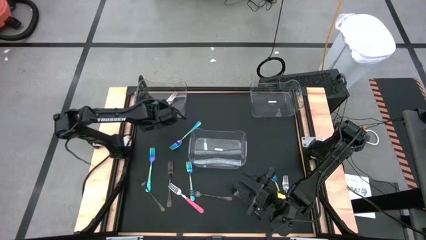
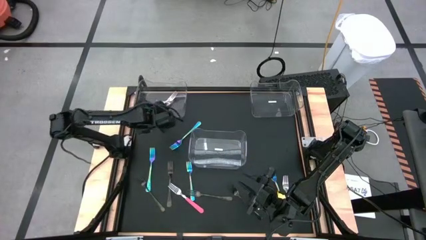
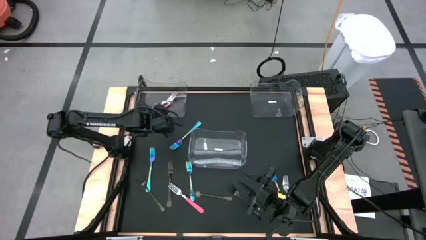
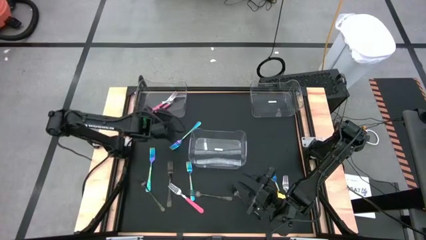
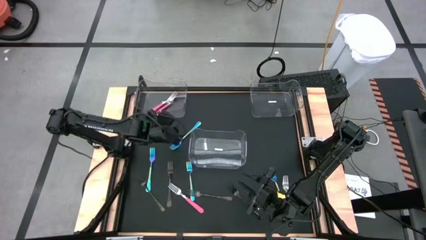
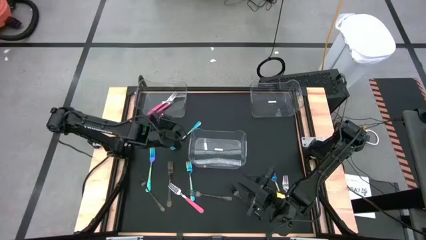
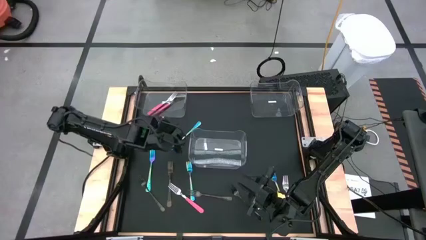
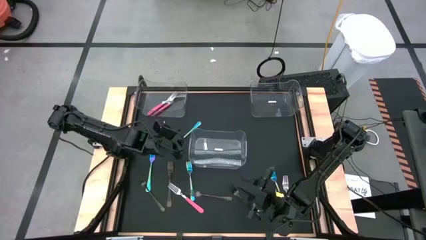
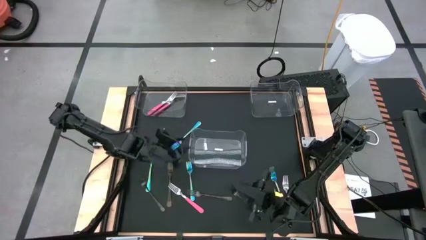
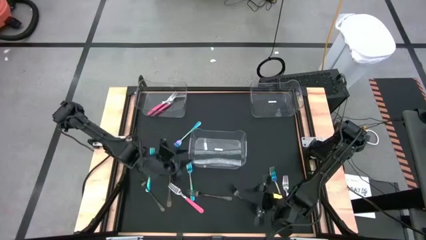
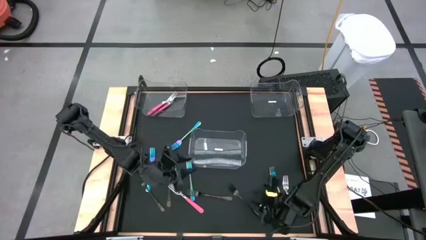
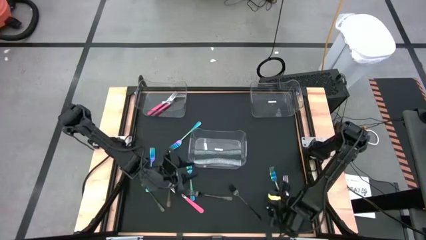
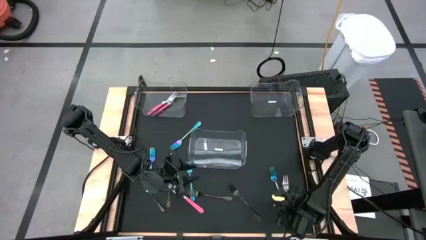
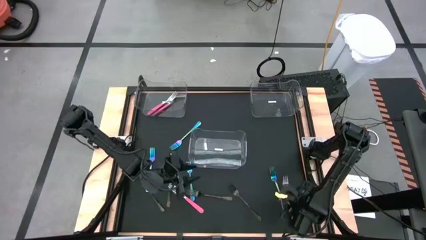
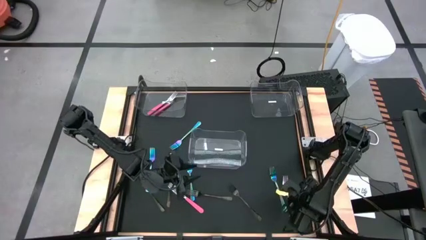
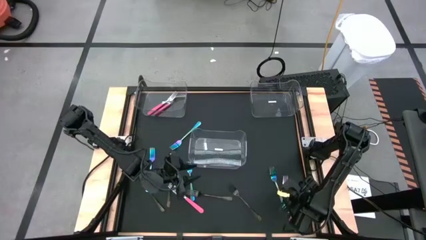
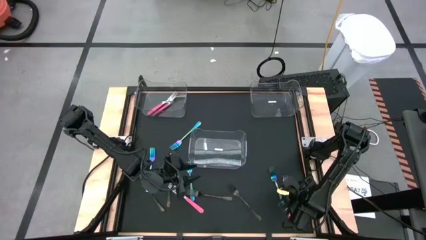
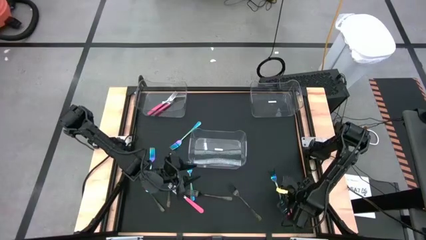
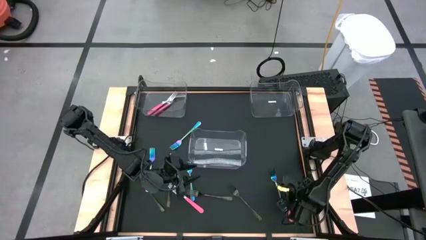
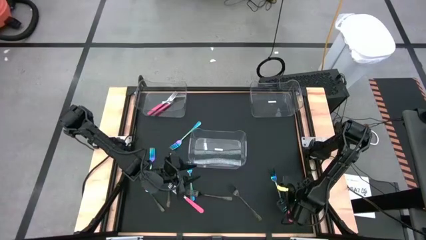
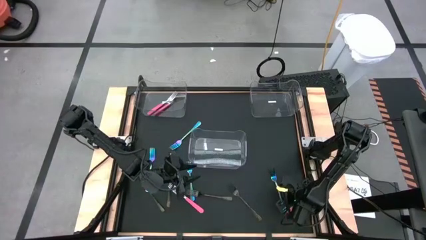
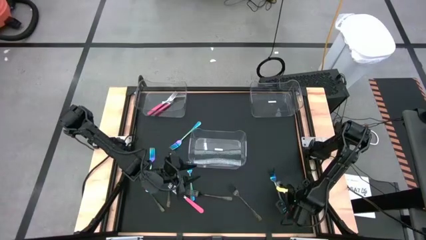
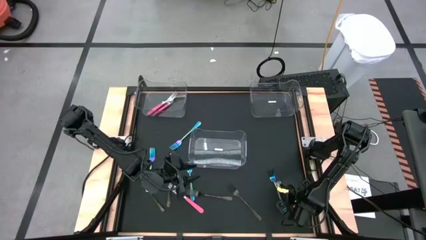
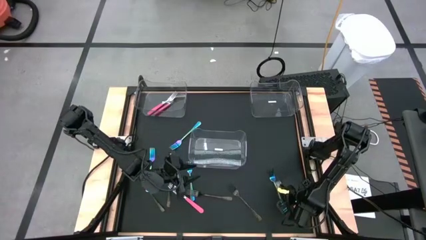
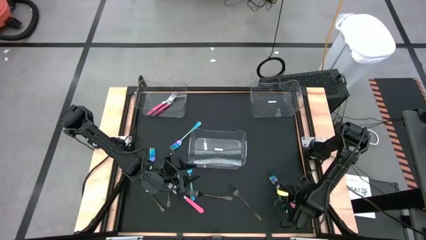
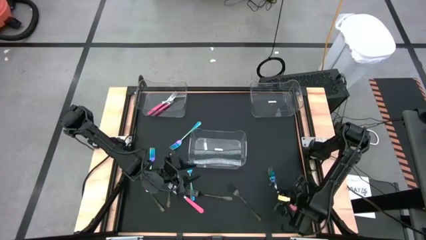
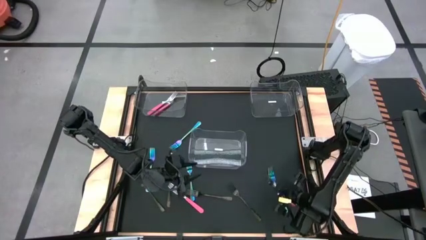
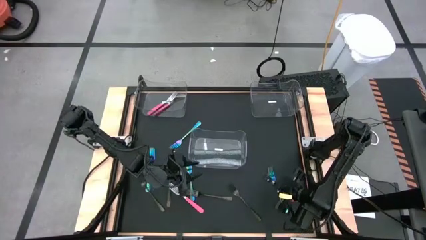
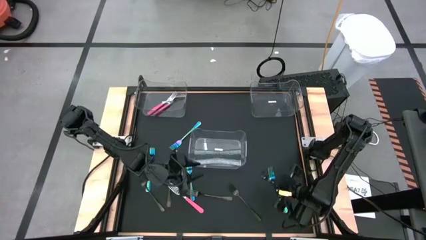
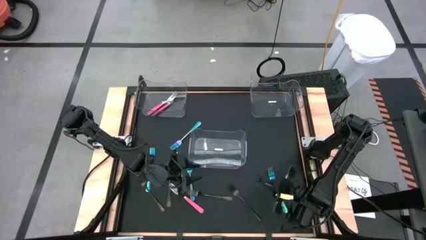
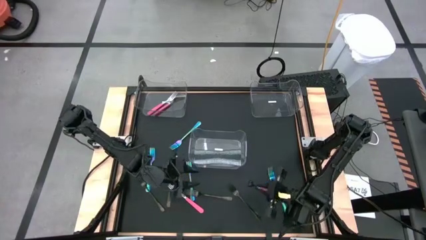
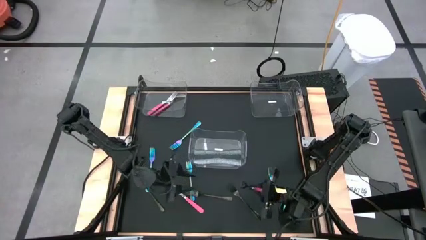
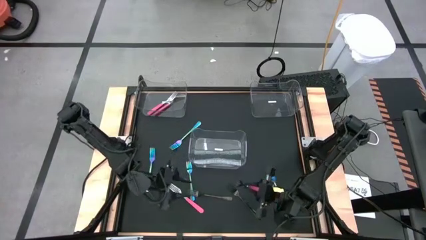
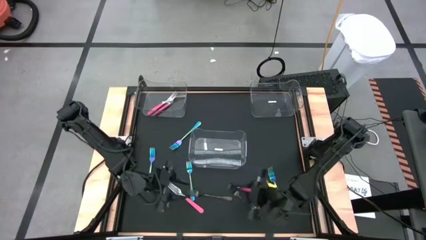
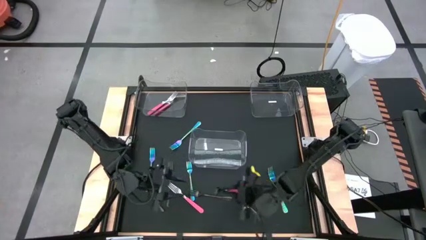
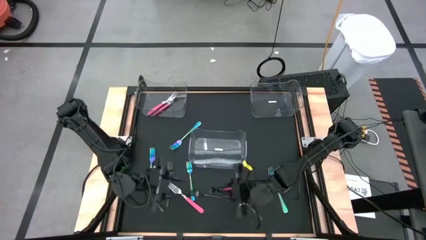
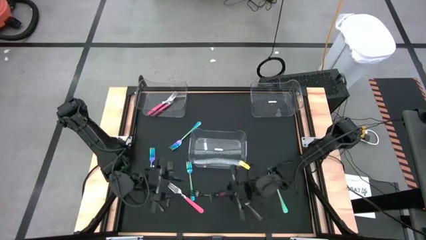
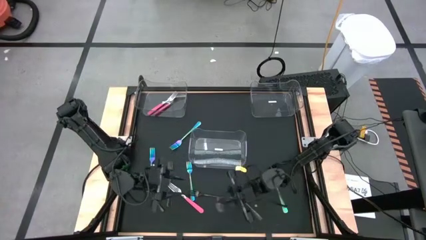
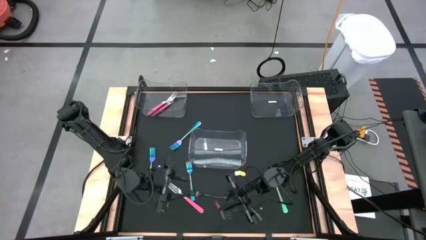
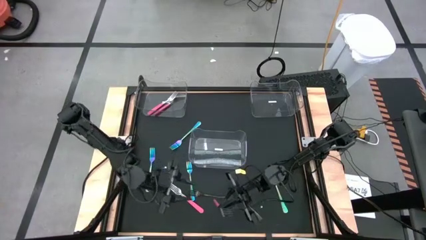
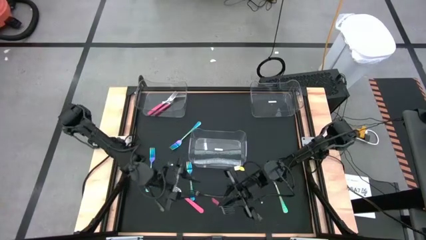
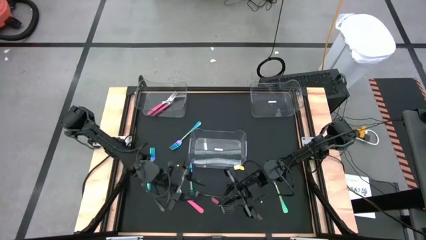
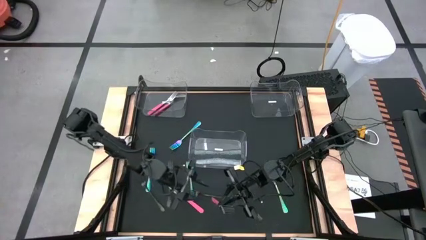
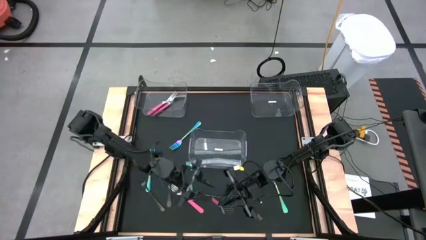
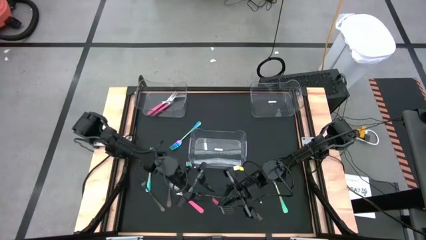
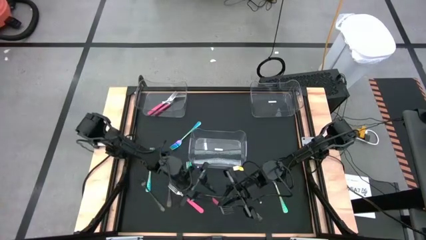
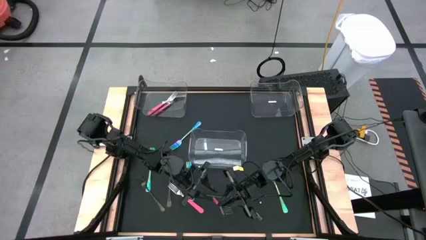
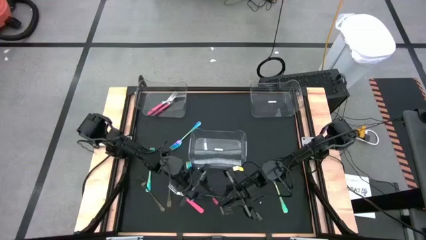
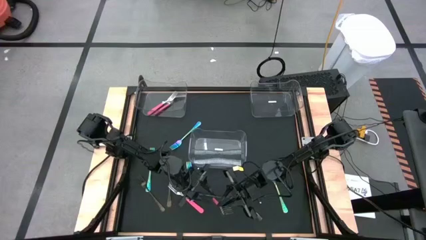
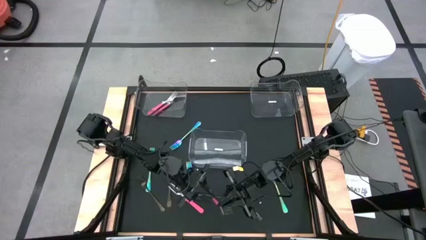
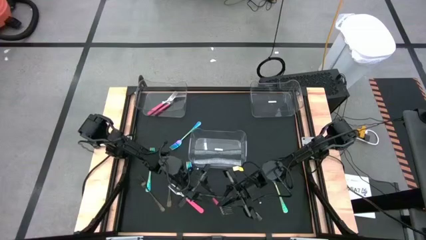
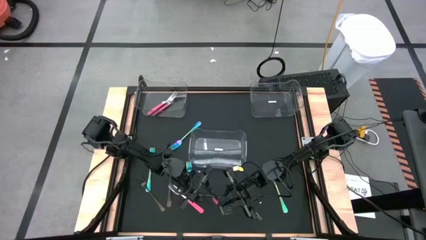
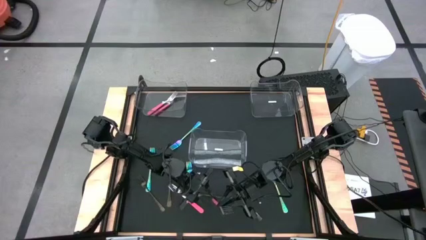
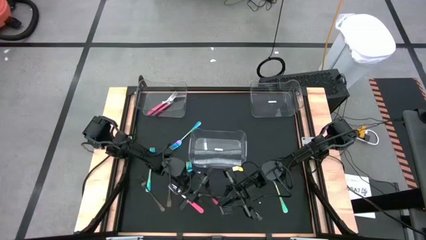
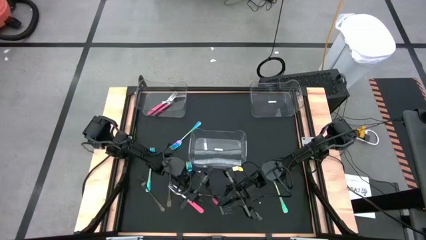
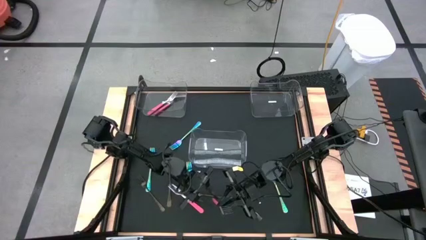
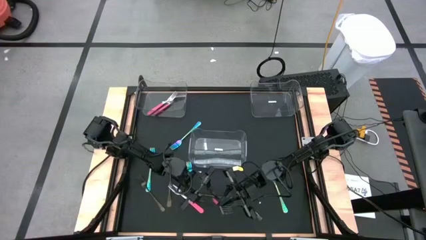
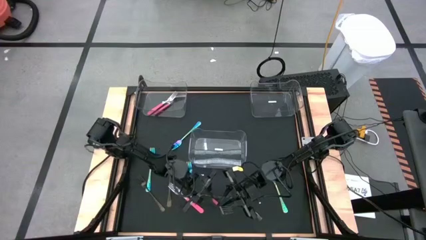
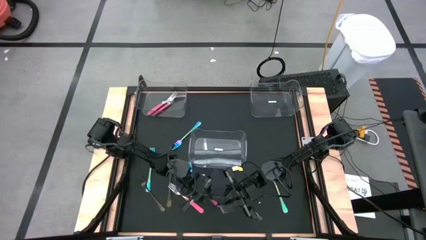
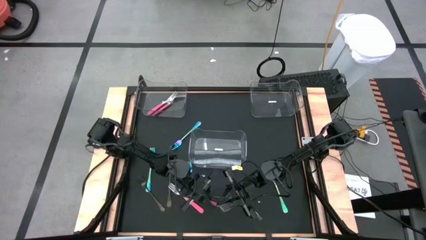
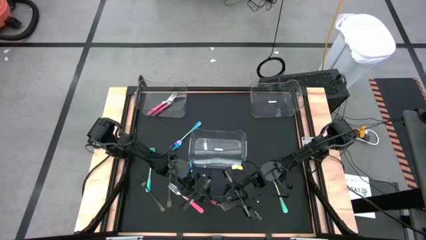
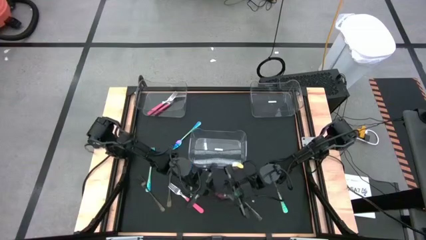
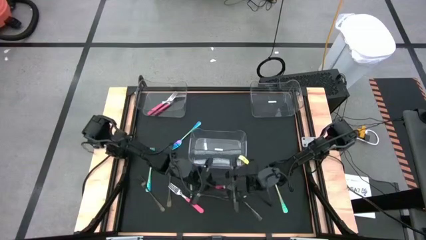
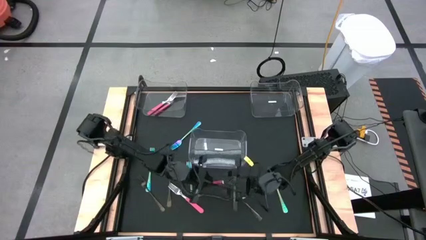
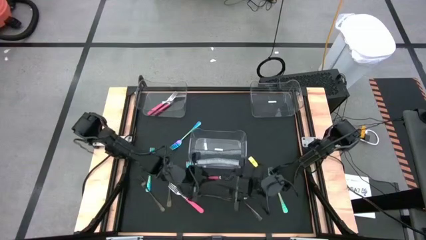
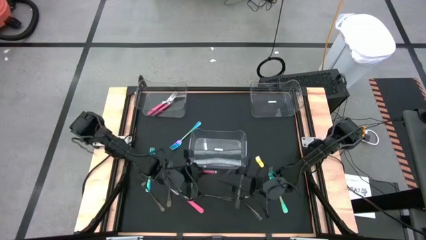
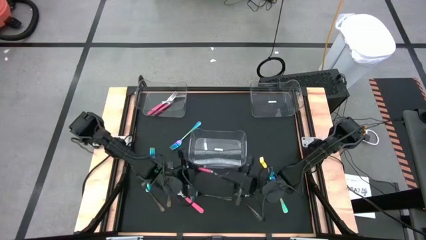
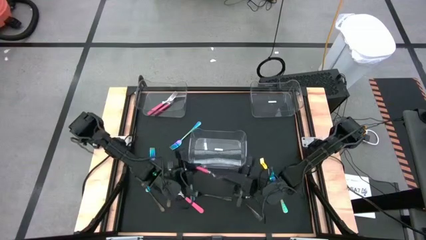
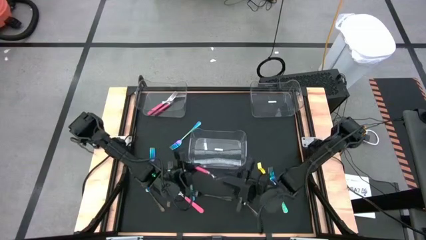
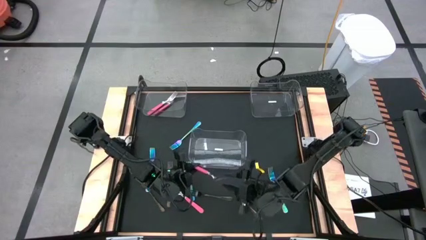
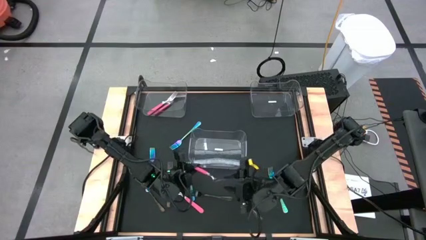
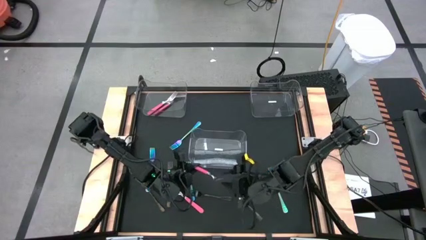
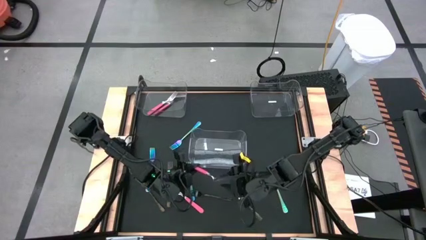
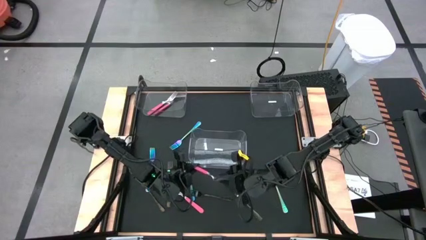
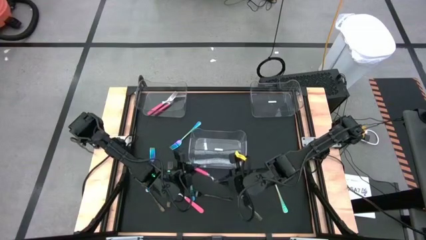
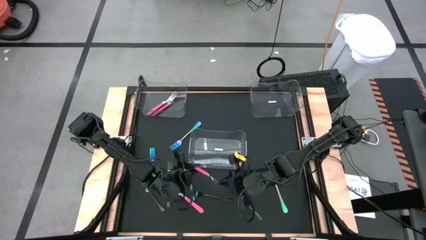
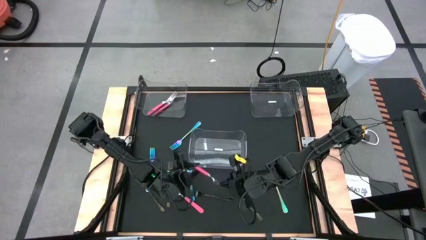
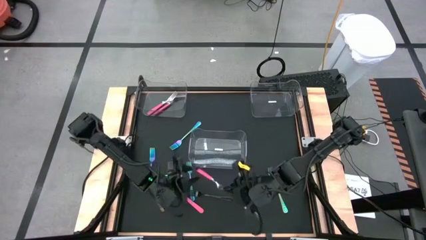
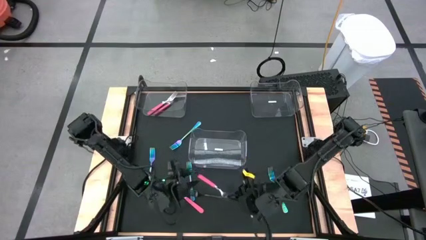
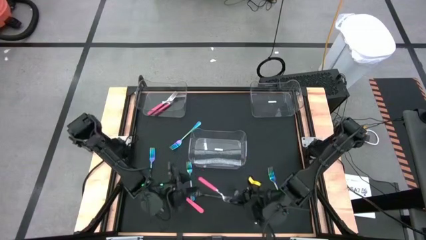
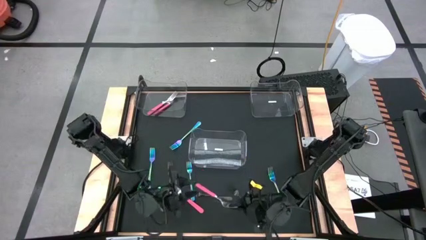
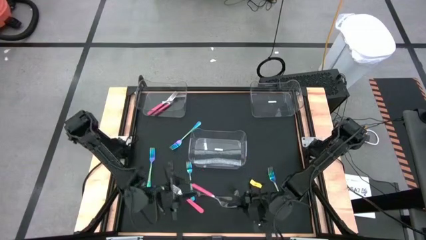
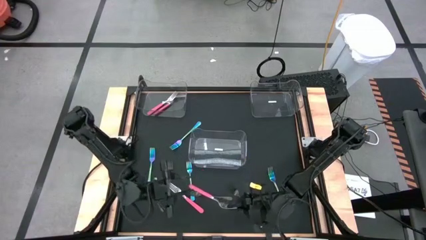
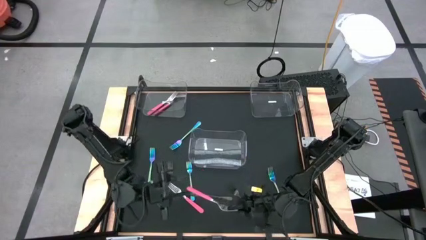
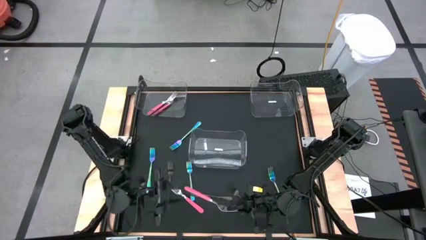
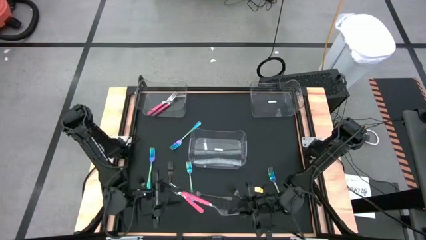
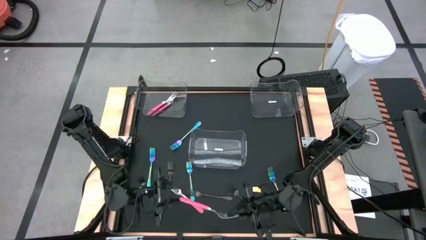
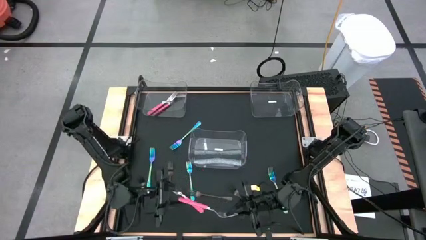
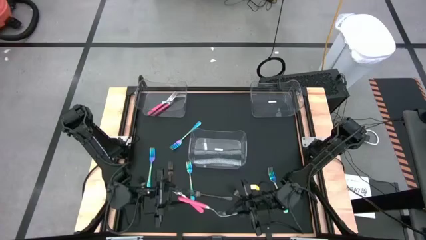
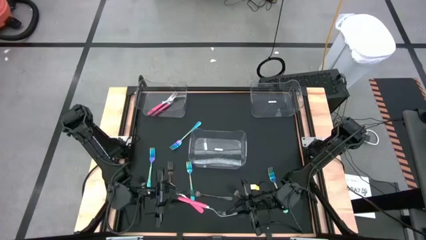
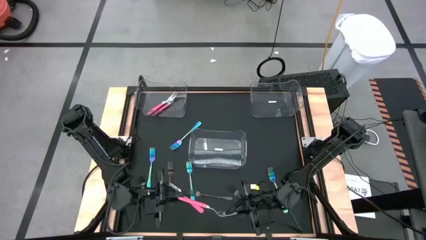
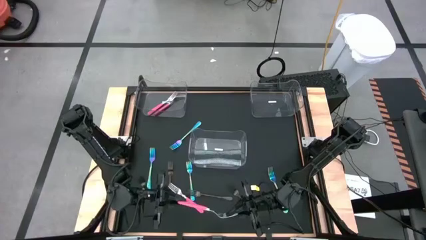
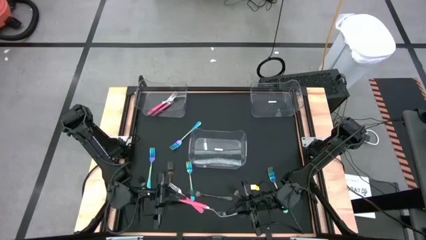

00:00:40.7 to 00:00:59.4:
Task: Sort silverware by color (type)
Put the pink fork into the left transparent bin
